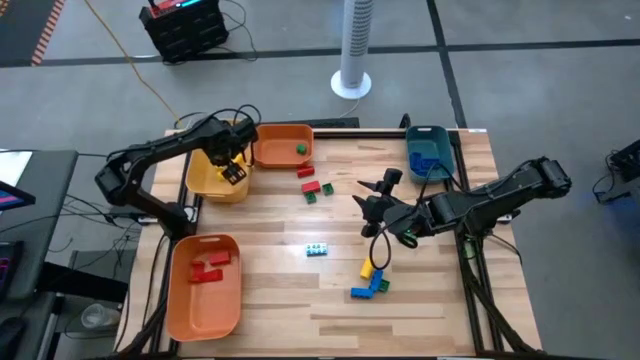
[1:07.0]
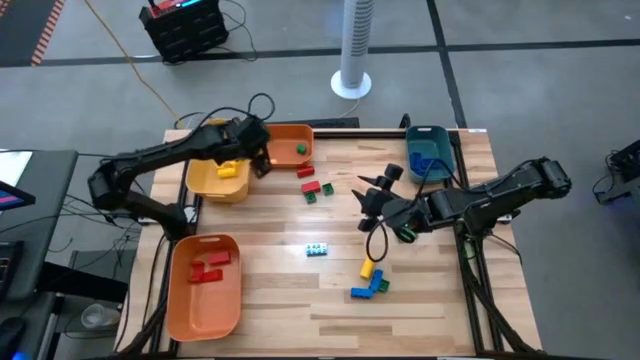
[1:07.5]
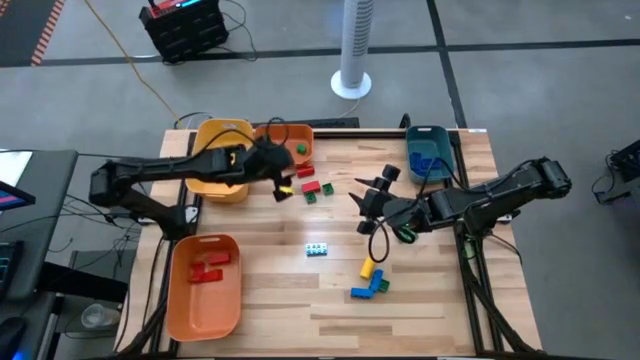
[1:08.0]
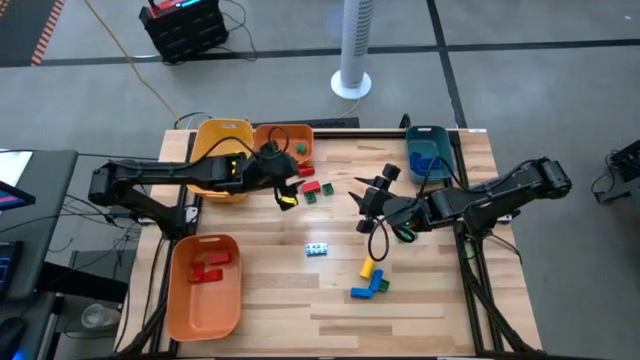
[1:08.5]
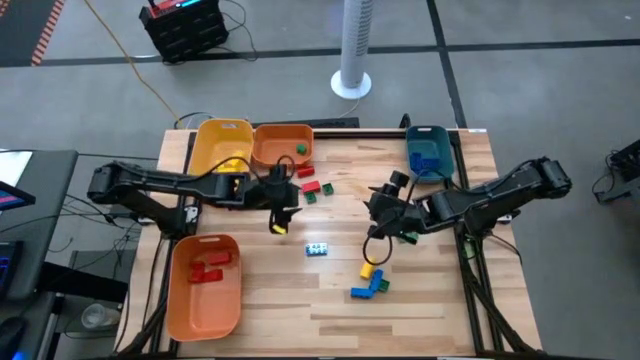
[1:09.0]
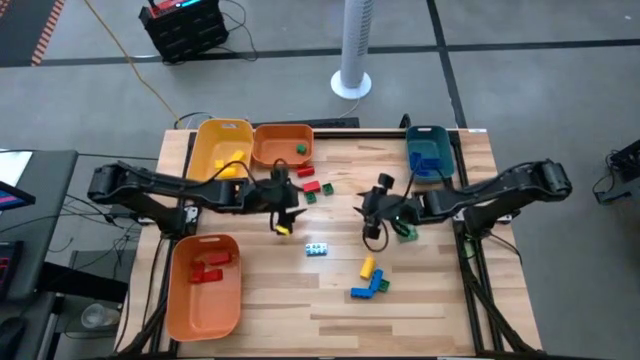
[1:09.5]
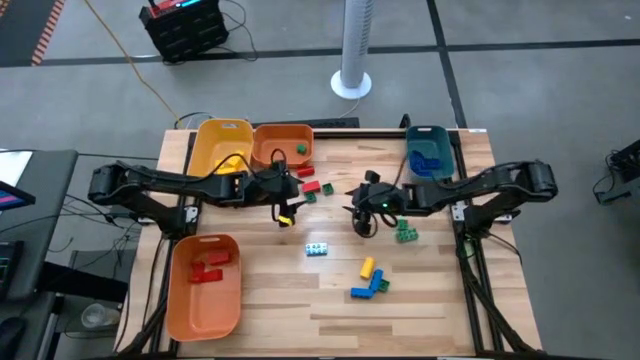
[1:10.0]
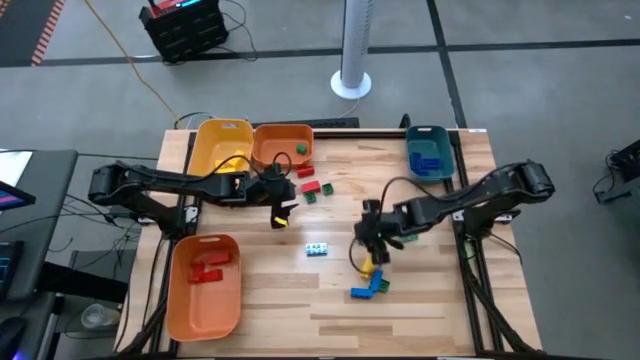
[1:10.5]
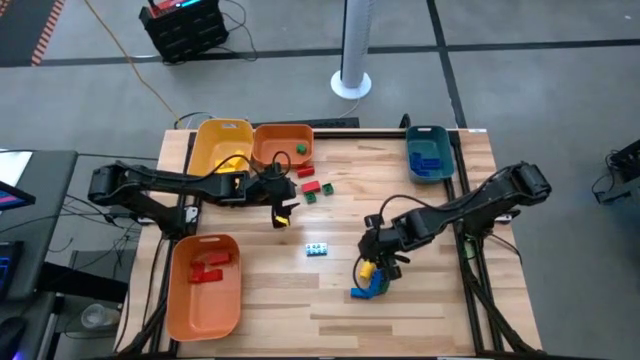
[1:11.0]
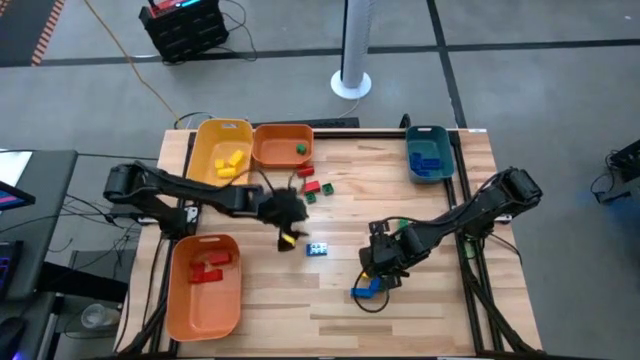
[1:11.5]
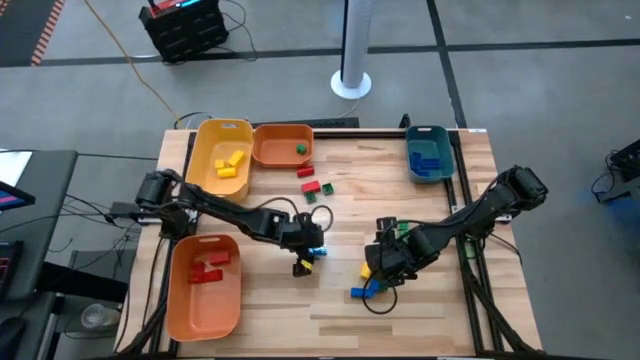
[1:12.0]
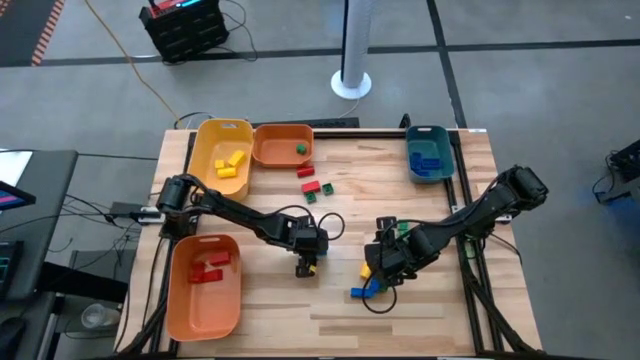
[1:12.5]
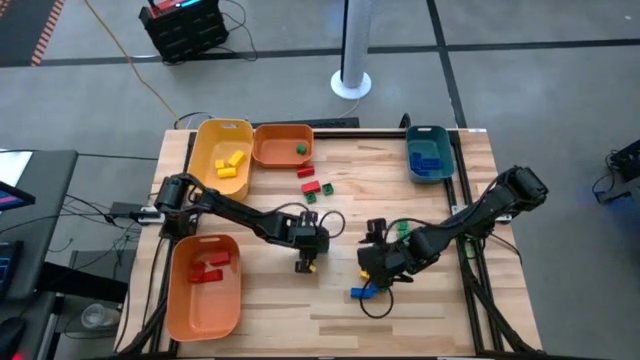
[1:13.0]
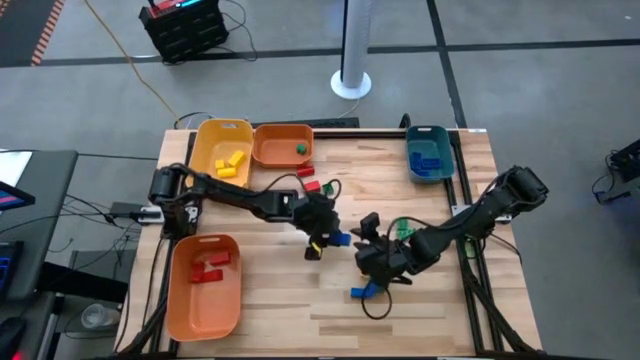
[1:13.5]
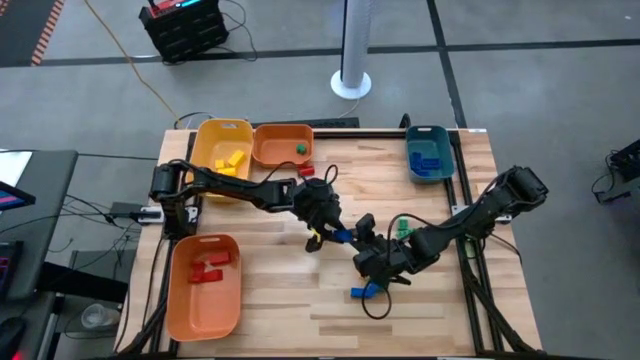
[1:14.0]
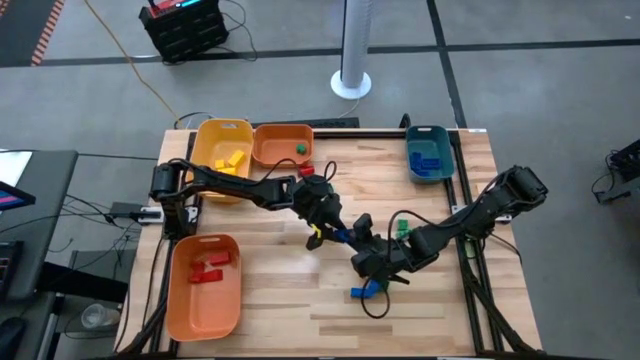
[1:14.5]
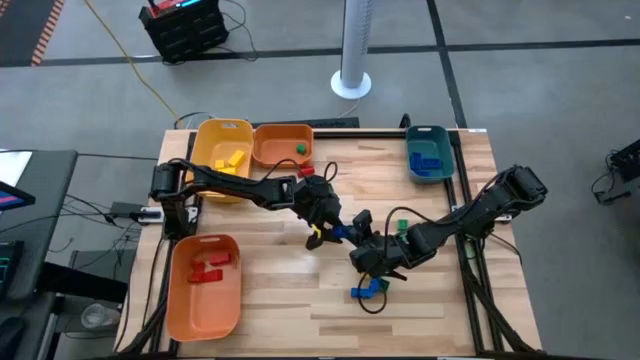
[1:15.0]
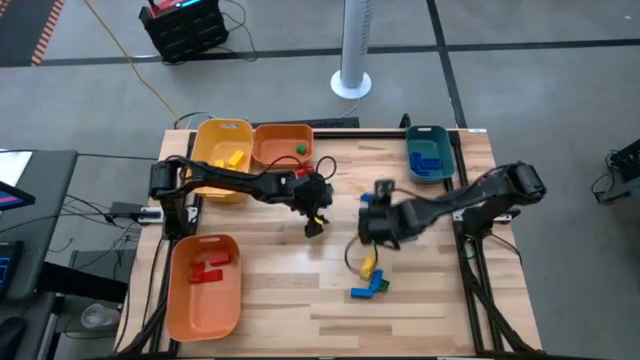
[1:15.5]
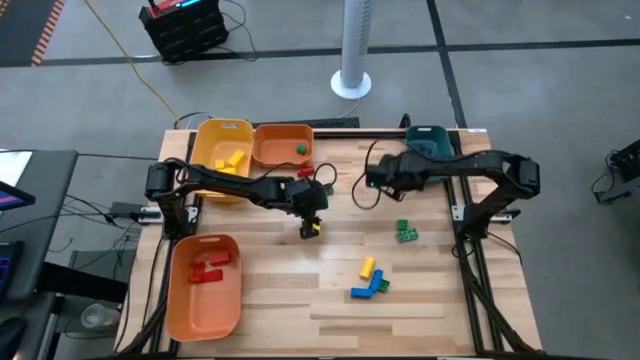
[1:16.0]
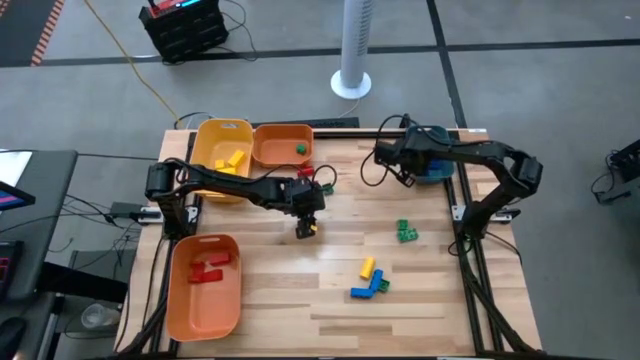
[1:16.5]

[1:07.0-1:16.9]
Task: Sort blocks
Put the blue game piece into the blue bin

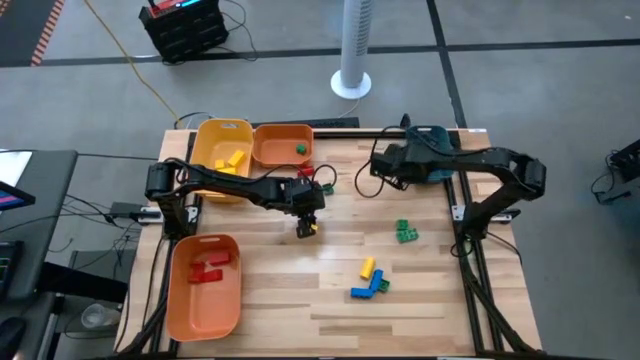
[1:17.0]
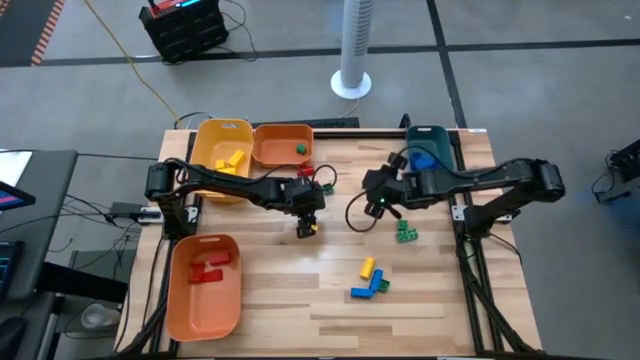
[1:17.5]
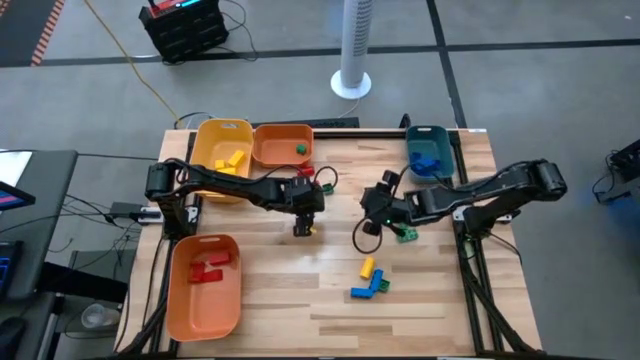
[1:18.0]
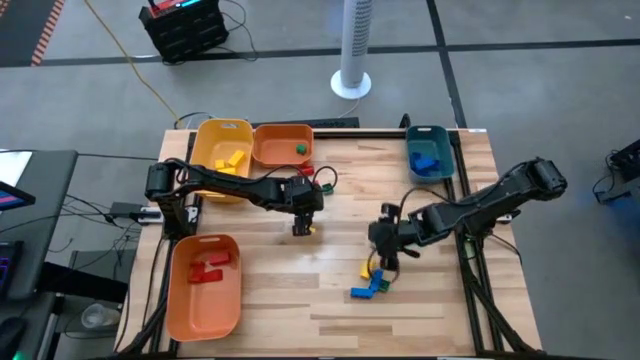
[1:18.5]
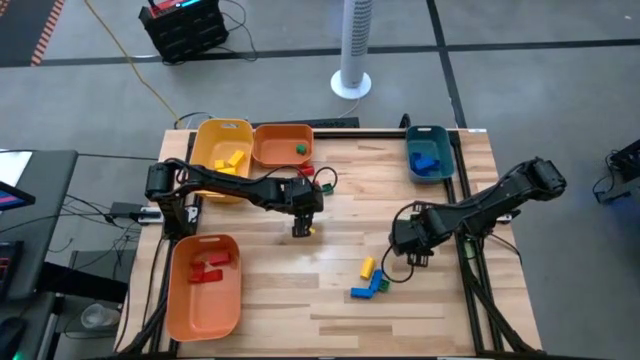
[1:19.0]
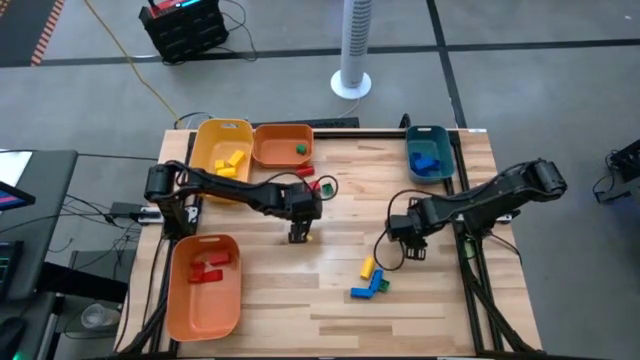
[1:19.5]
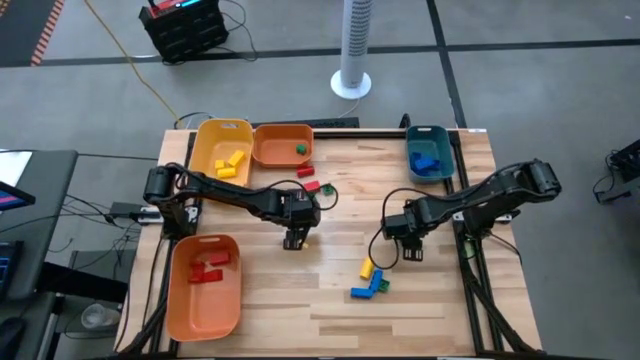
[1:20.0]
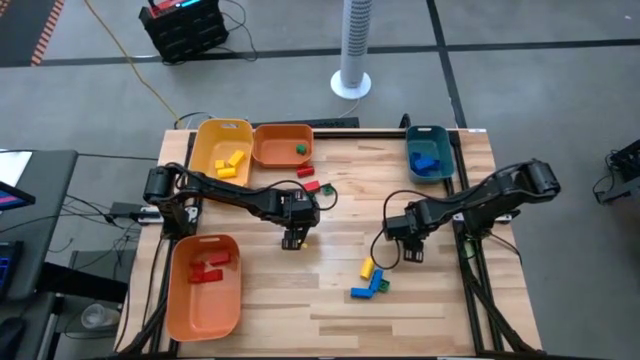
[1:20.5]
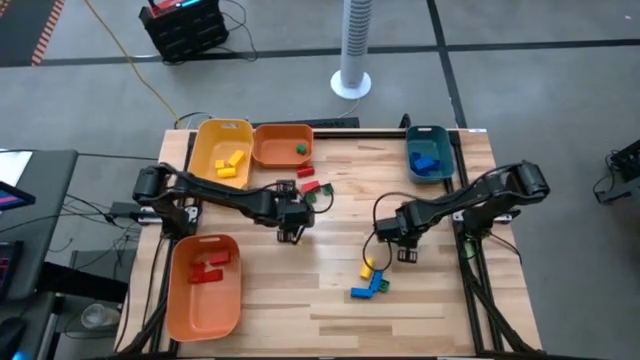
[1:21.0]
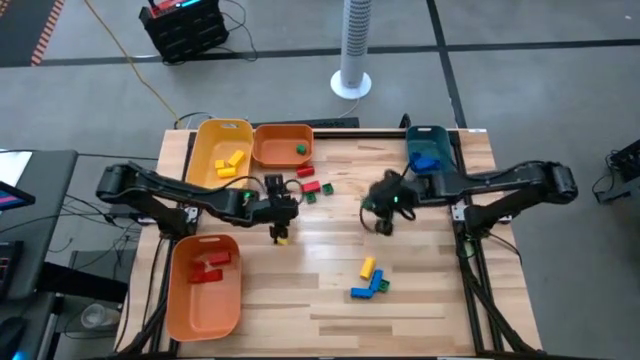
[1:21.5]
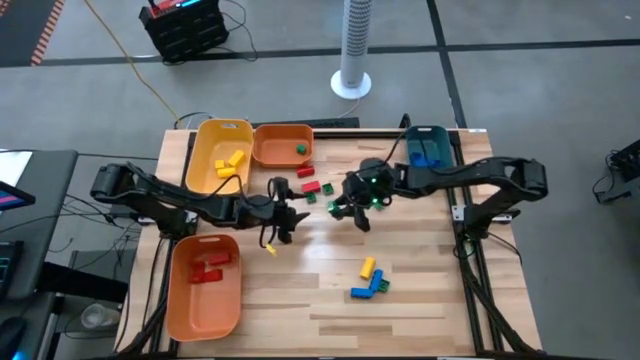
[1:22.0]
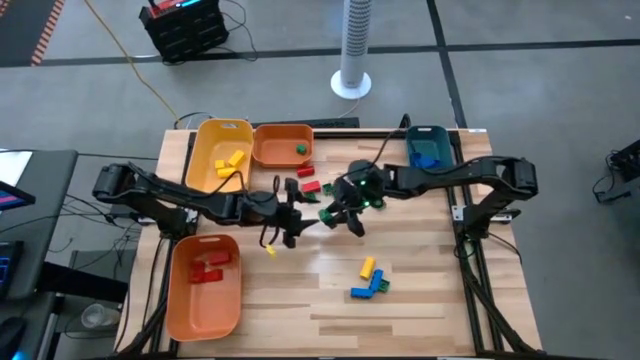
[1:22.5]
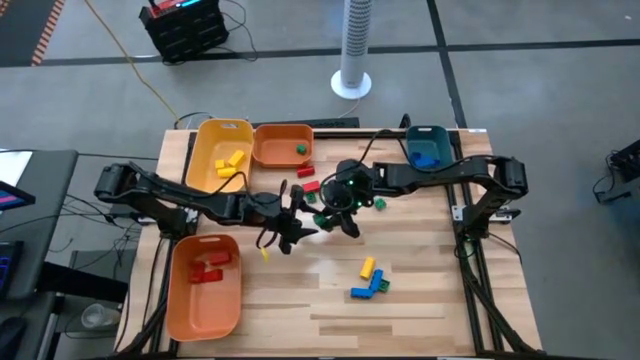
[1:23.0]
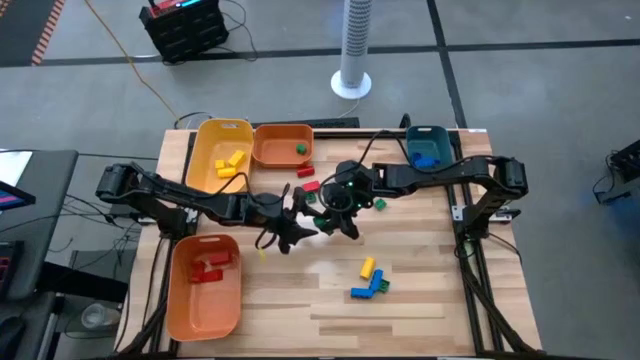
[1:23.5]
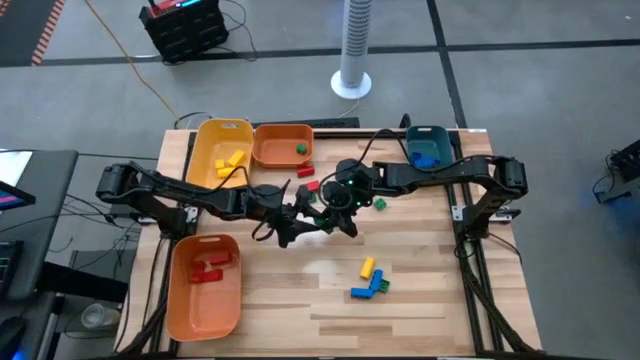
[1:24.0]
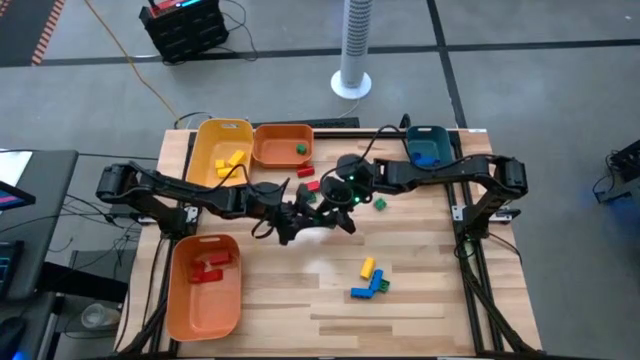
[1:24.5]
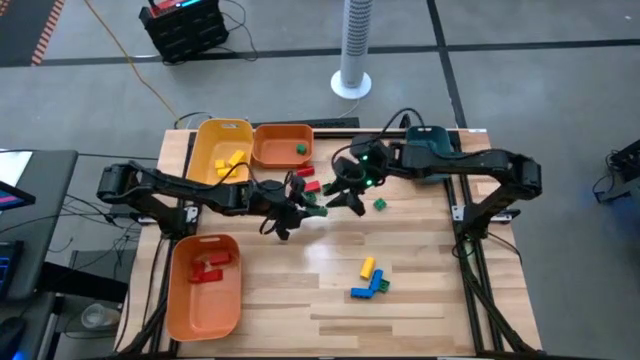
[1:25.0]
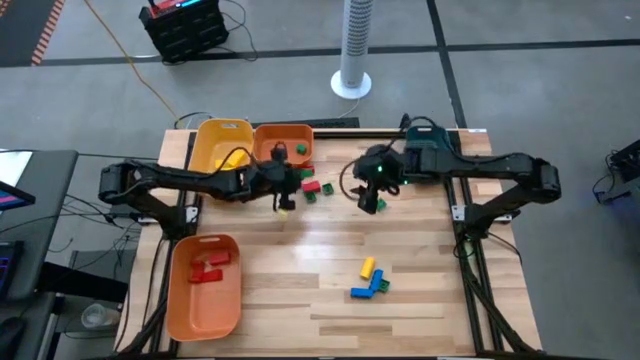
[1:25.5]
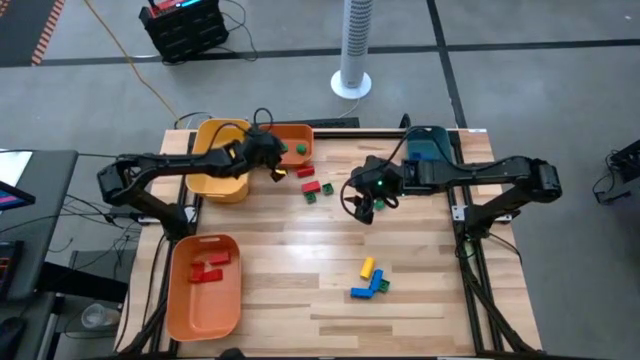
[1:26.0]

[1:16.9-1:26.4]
Put the green game piece into the top orange bin

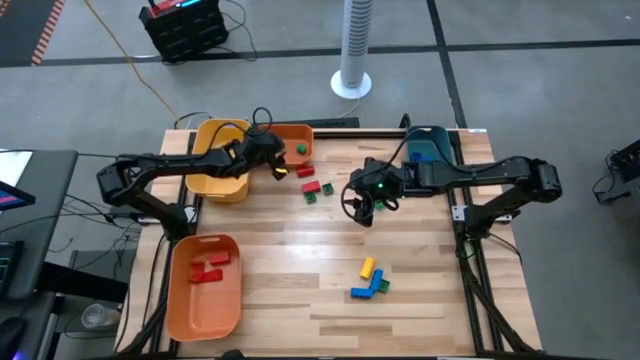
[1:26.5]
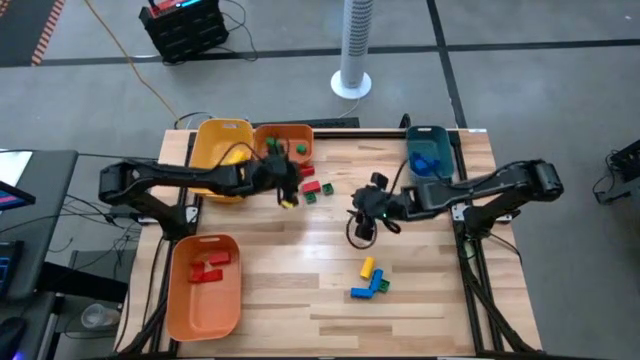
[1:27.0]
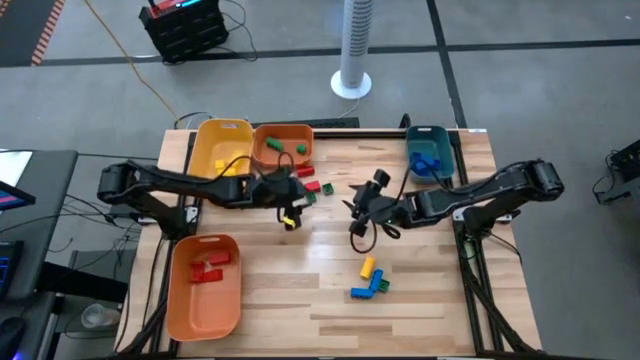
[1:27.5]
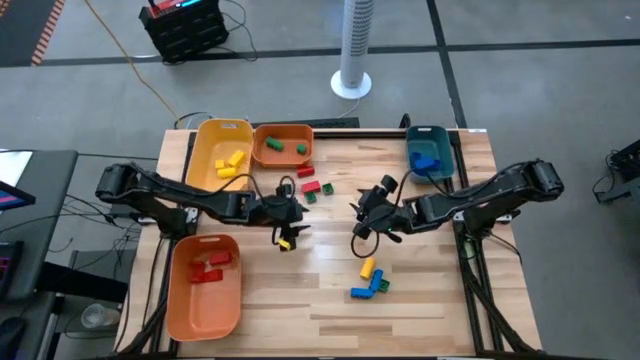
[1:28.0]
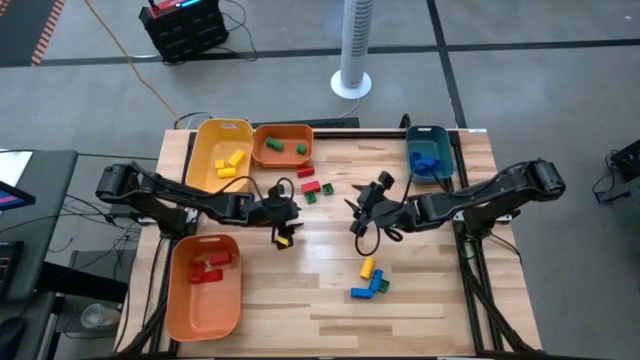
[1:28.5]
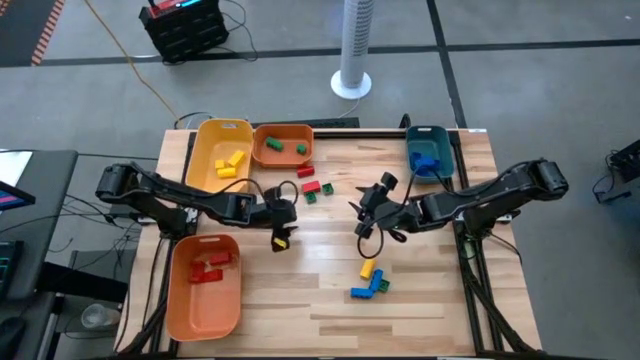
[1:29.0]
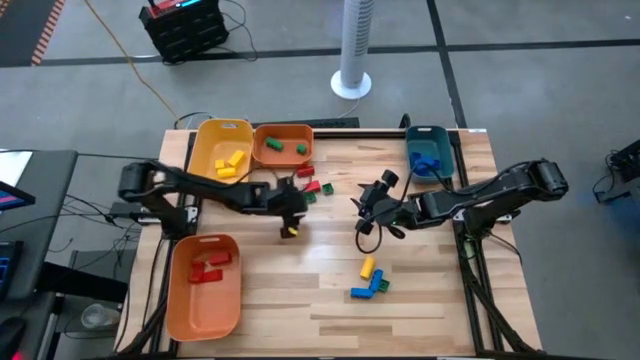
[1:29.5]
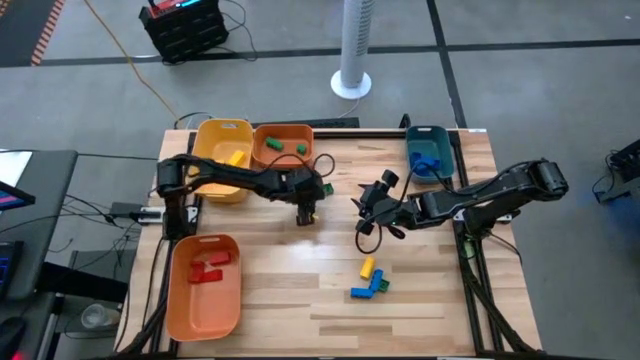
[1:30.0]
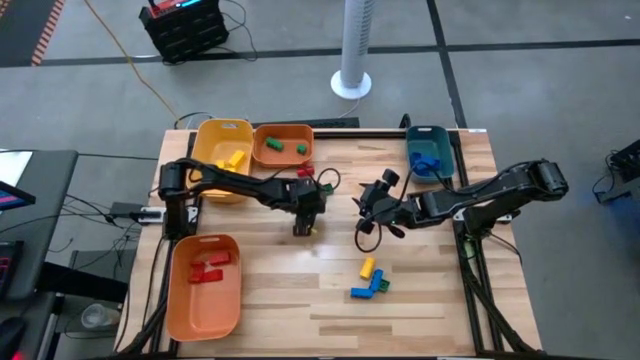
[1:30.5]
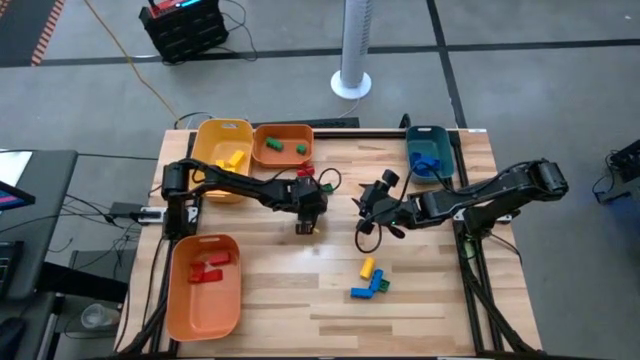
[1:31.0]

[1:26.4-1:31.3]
Put the green game piece into the top orange bin
